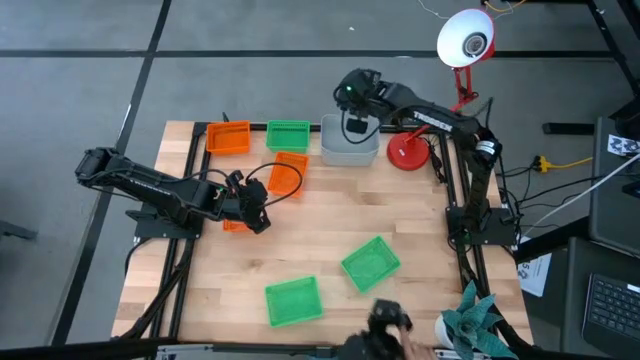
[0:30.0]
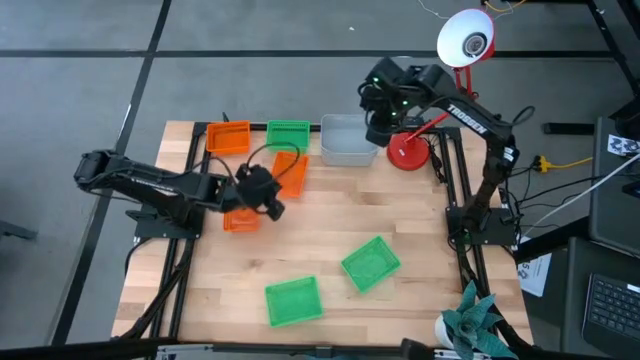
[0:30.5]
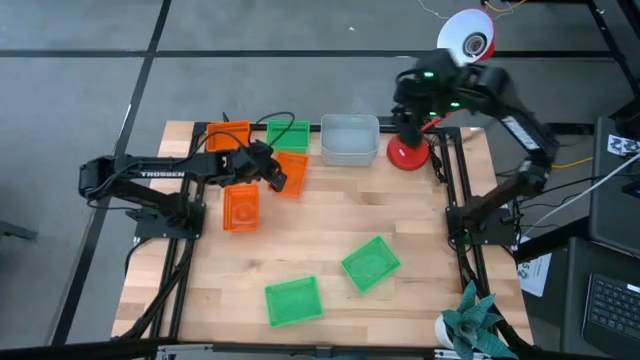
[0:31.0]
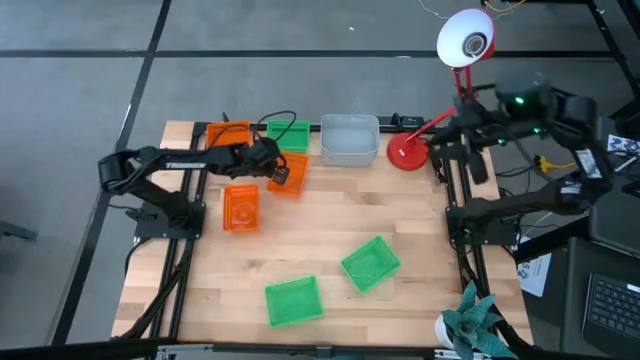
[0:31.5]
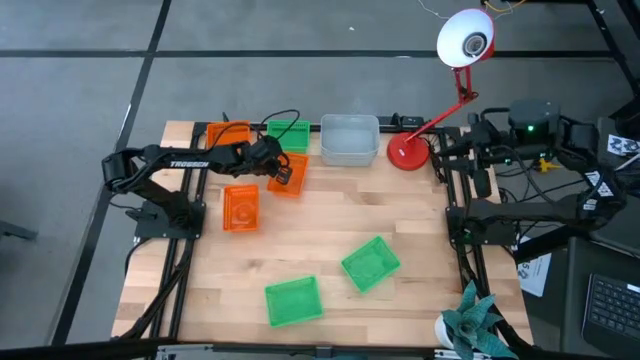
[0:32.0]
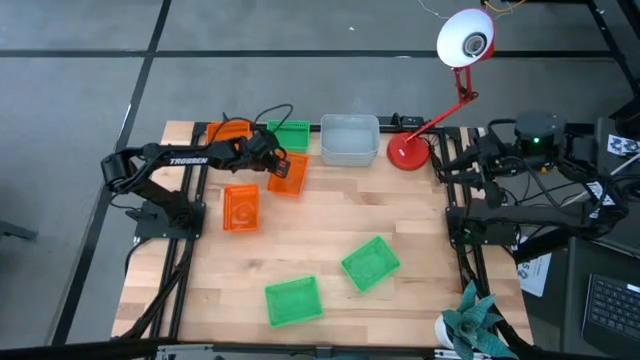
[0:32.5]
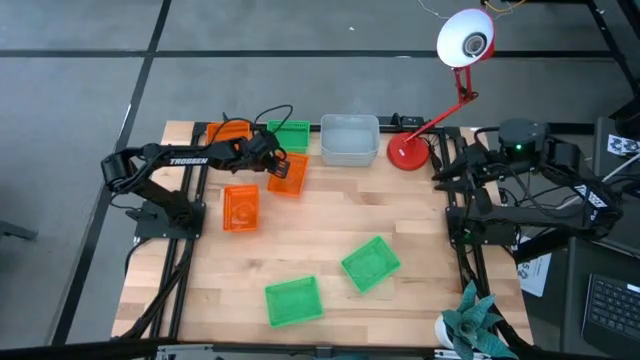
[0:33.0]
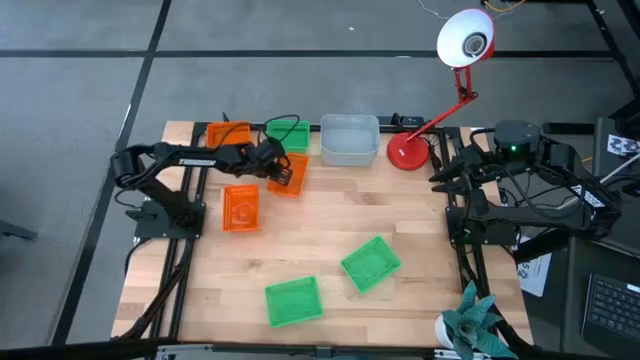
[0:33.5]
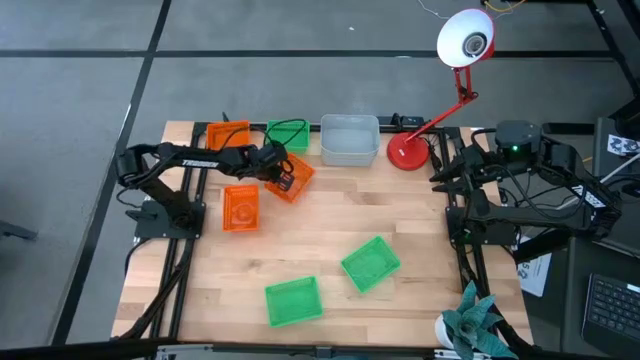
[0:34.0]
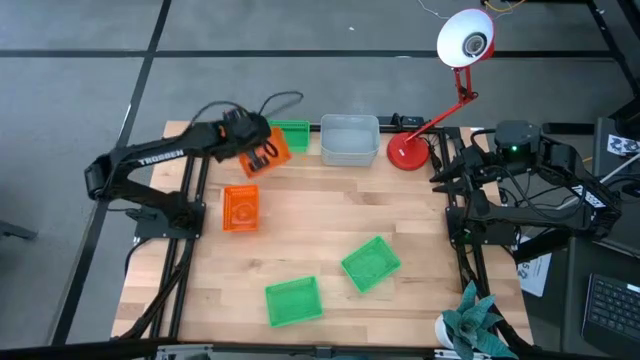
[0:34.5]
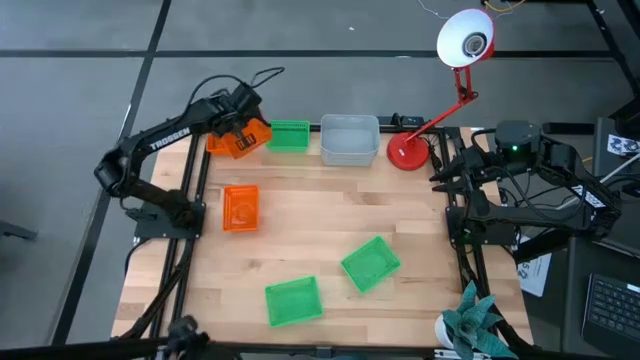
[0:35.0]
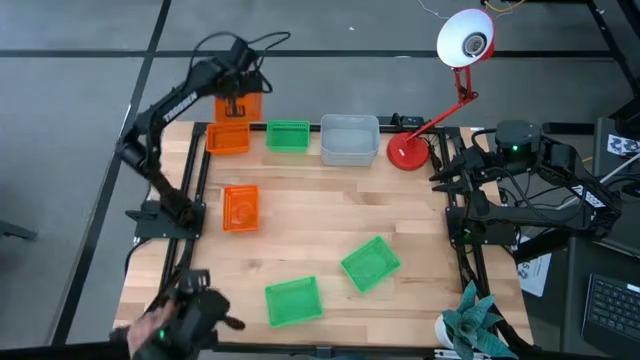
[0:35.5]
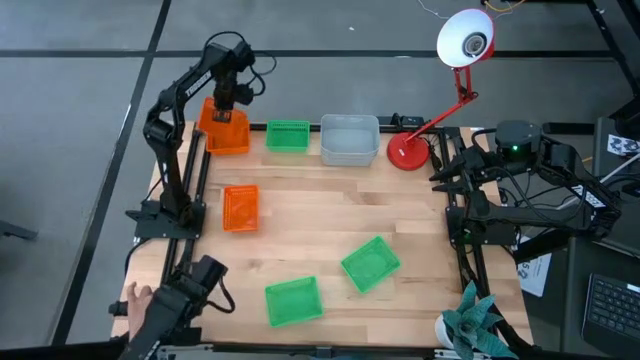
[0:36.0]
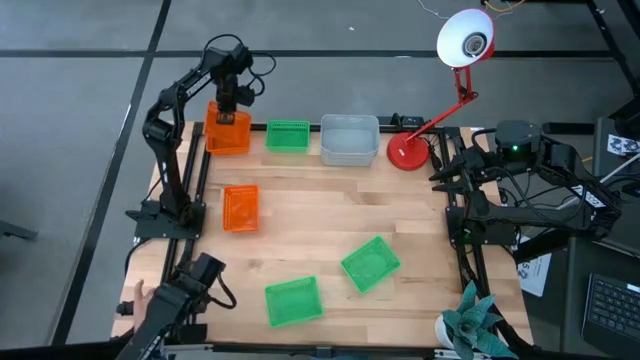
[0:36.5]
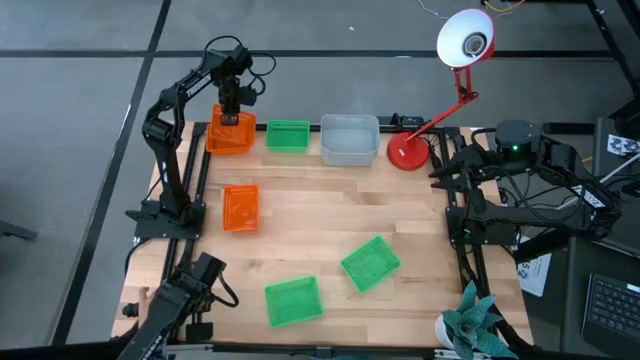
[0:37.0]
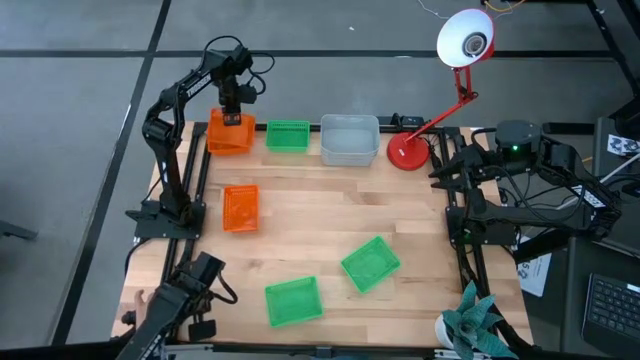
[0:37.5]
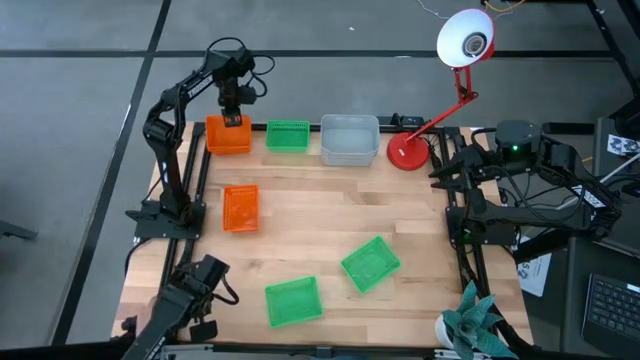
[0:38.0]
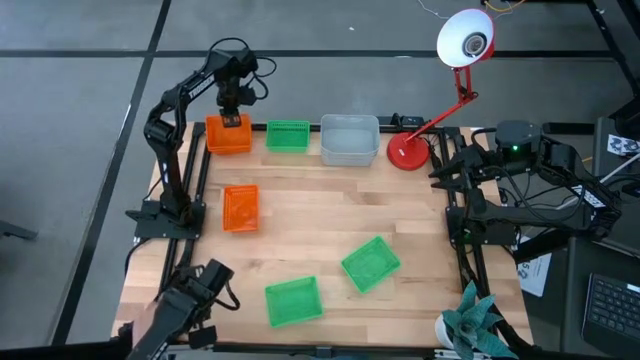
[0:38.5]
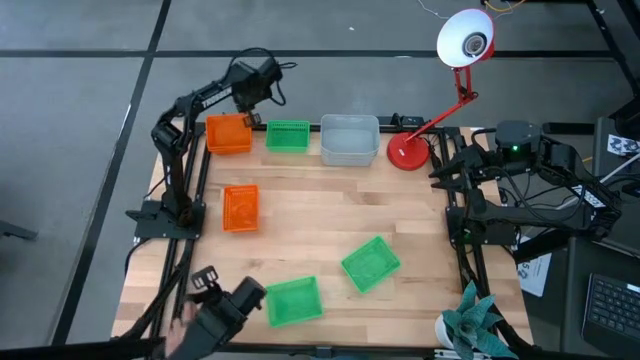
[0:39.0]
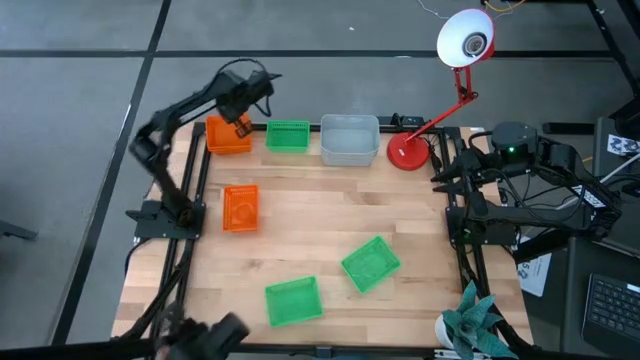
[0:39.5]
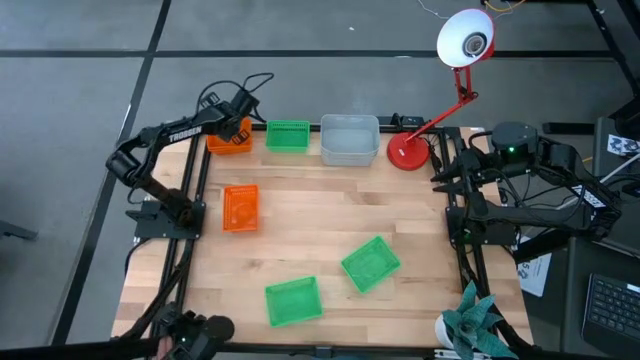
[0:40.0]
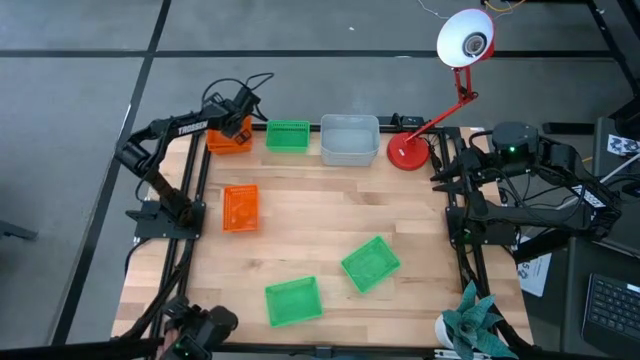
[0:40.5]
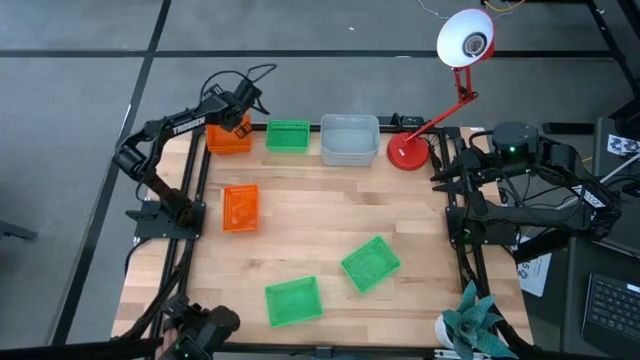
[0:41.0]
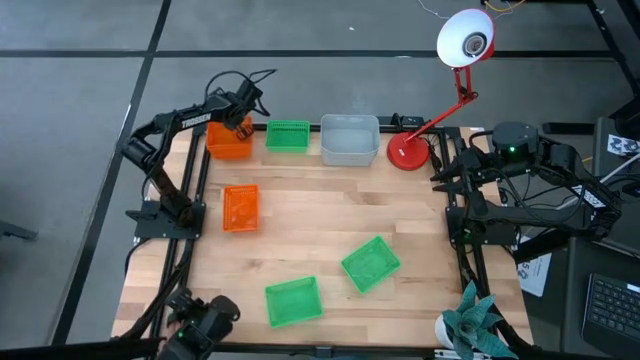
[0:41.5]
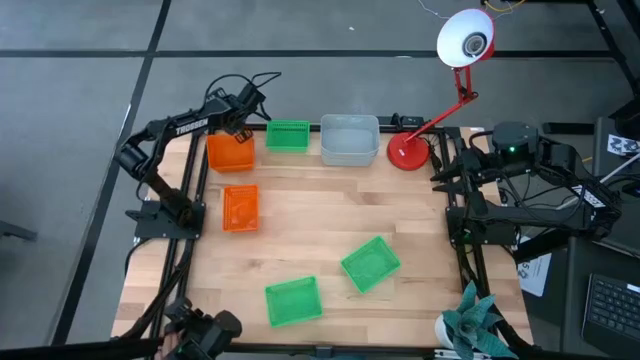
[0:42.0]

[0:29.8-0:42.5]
Stack the middle right orange bin on top of the top orange bin

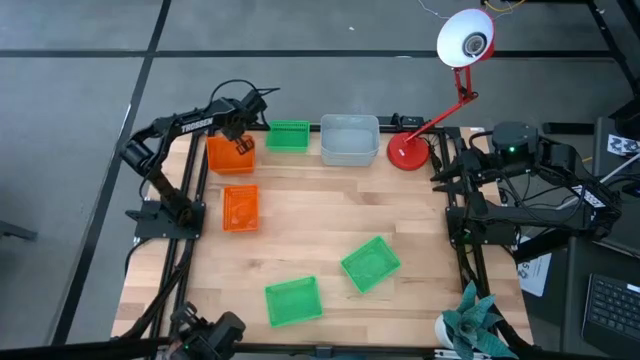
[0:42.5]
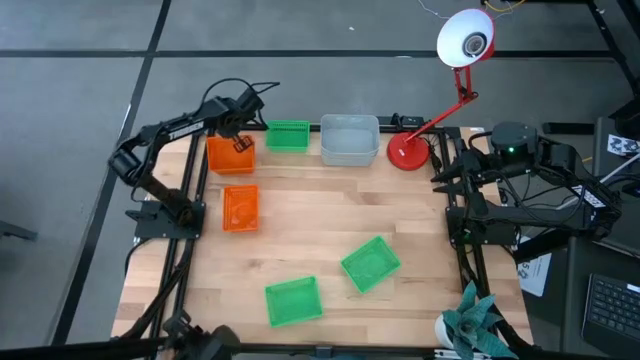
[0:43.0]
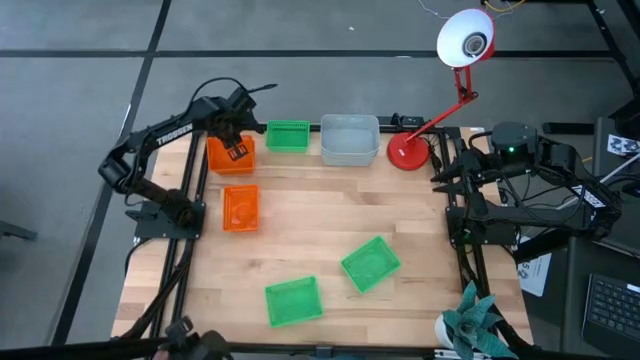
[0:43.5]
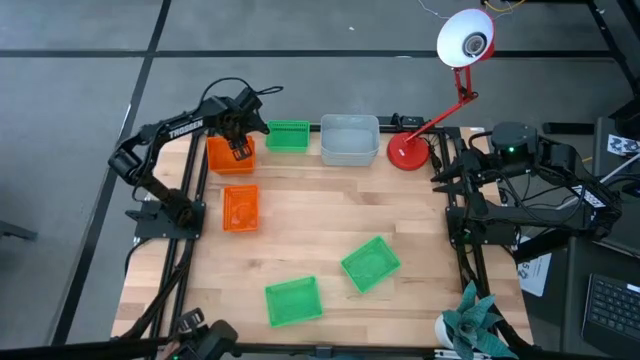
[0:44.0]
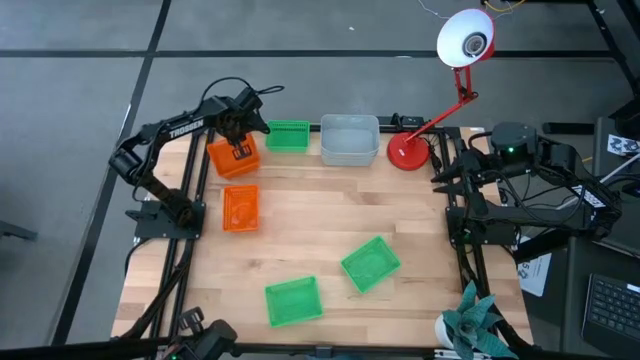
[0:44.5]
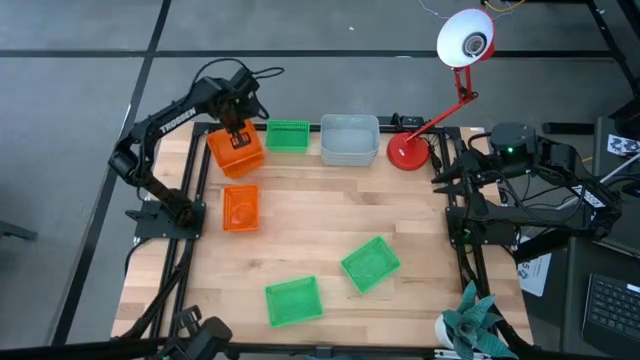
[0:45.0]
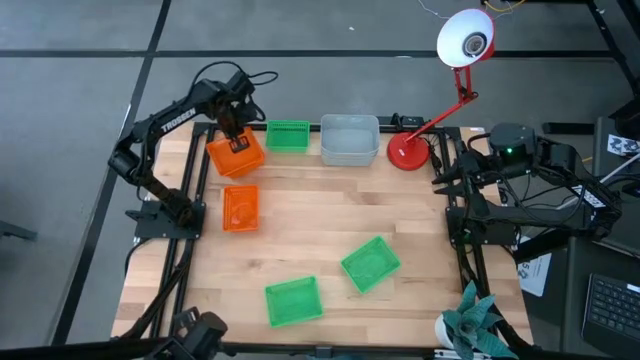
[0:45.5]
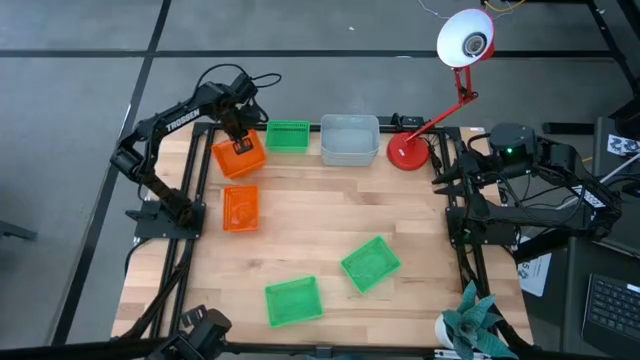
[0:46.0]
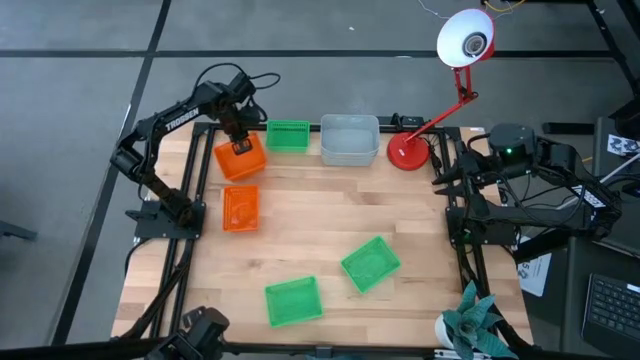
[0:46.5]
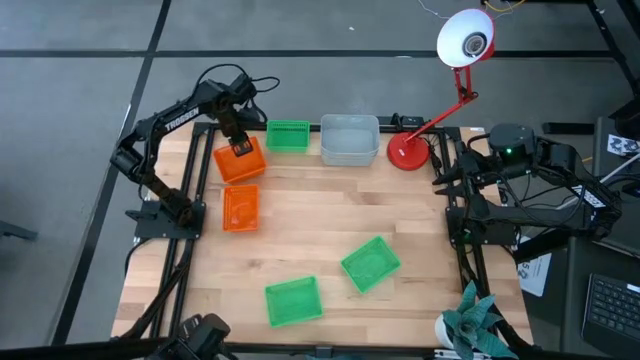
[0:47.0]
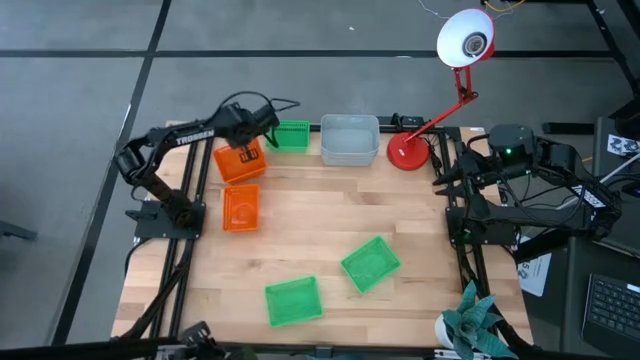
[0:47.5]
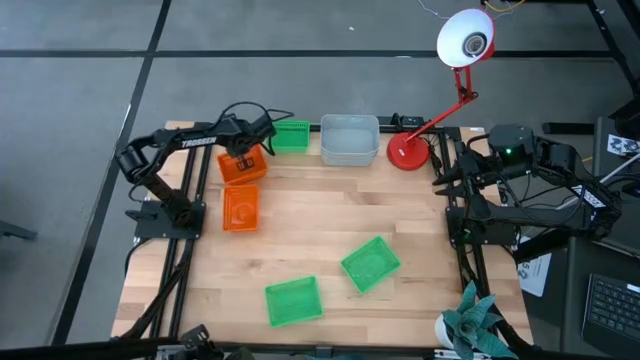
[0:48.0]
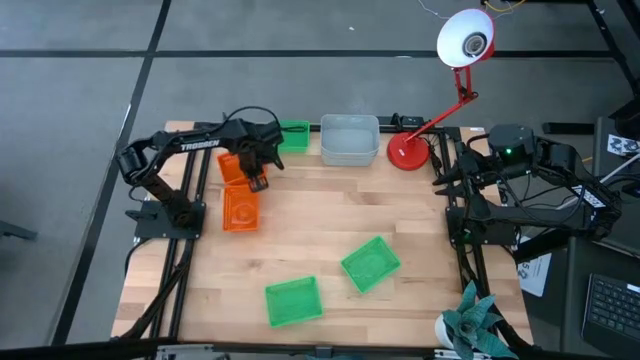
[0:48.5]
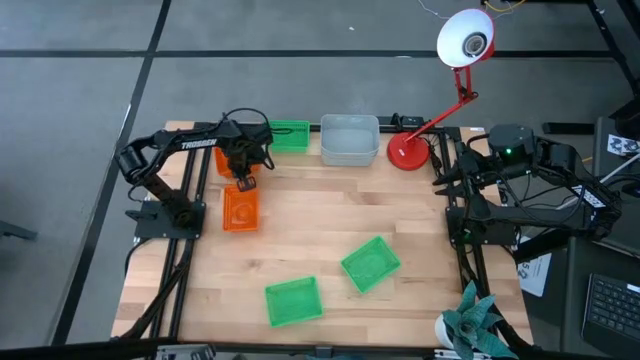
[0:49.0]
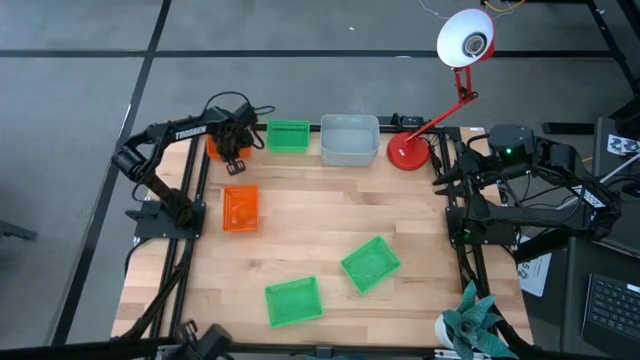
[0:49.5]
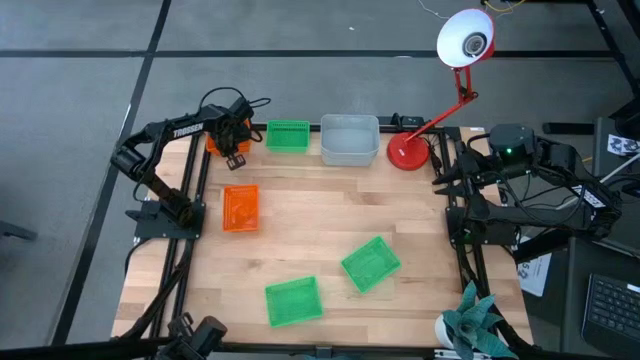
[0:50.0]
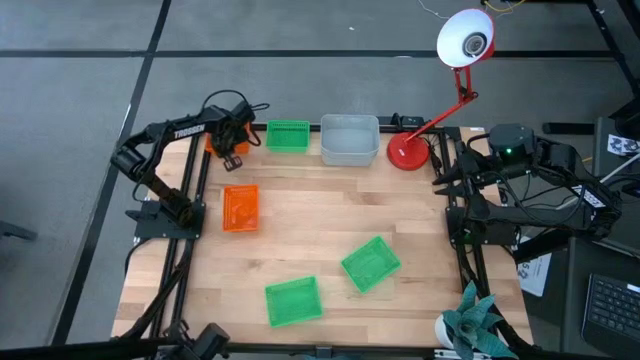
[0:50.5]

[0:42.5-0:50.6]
Stack the middle right orange bin on top of the top orange bin
